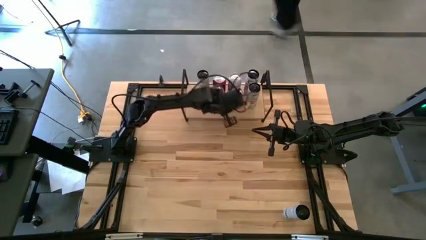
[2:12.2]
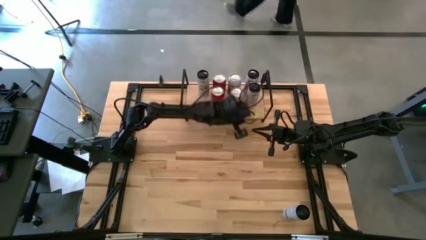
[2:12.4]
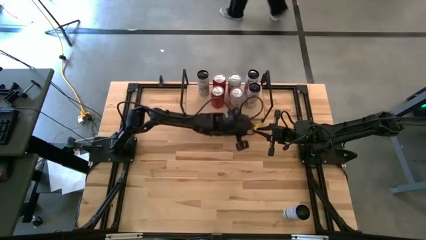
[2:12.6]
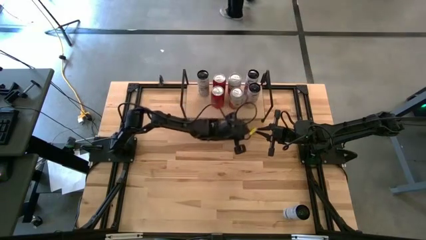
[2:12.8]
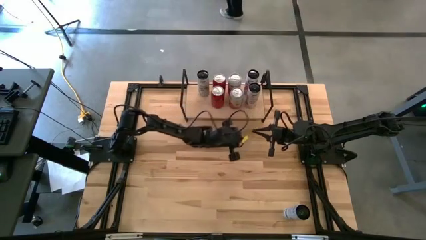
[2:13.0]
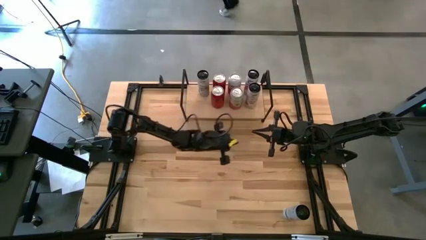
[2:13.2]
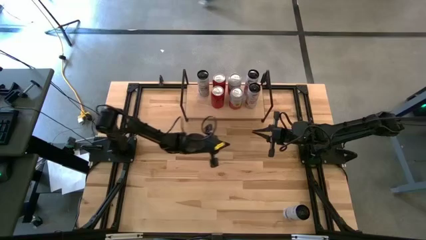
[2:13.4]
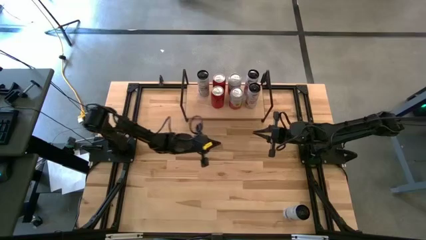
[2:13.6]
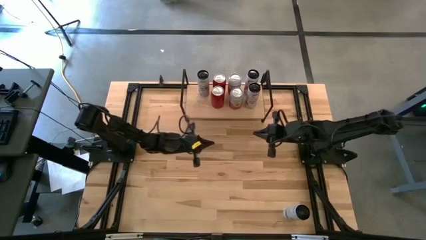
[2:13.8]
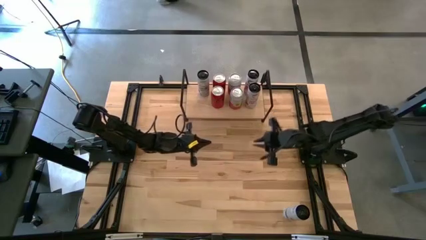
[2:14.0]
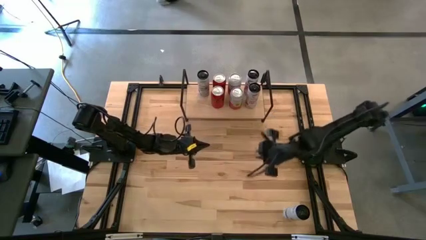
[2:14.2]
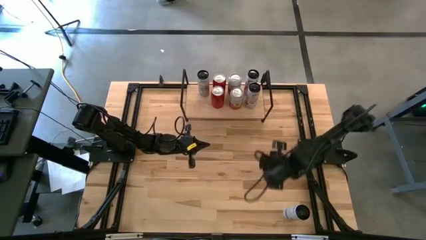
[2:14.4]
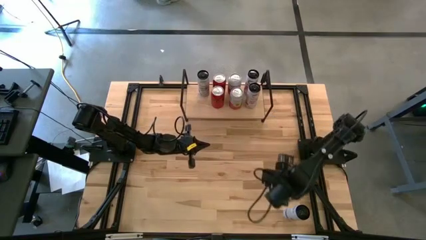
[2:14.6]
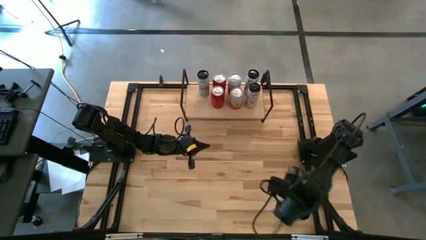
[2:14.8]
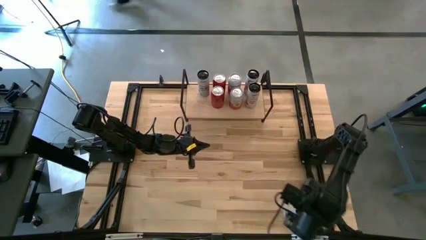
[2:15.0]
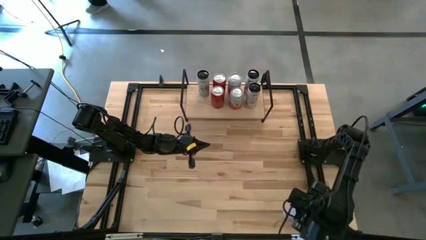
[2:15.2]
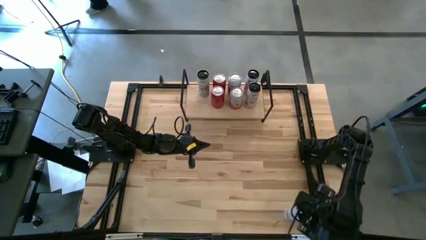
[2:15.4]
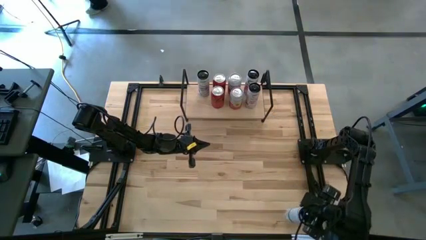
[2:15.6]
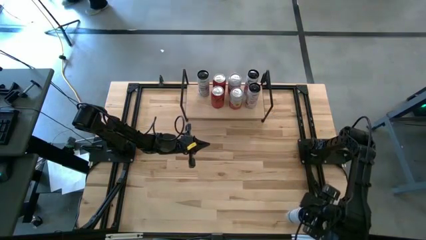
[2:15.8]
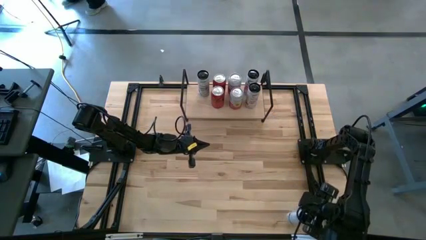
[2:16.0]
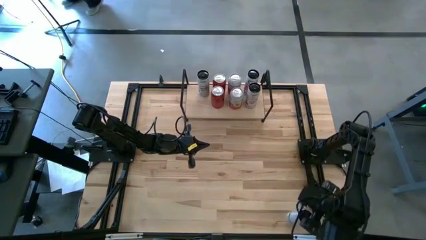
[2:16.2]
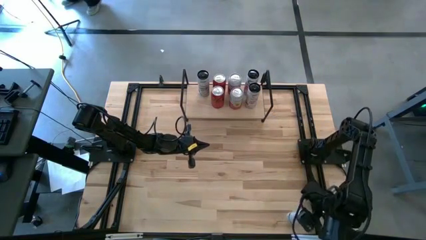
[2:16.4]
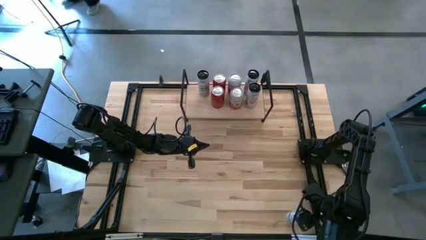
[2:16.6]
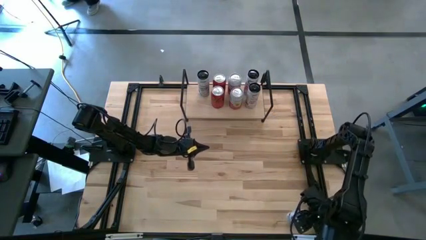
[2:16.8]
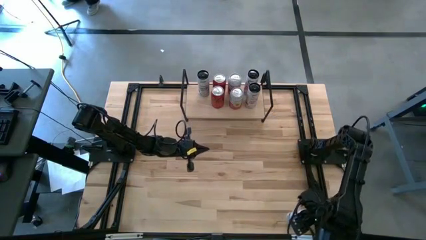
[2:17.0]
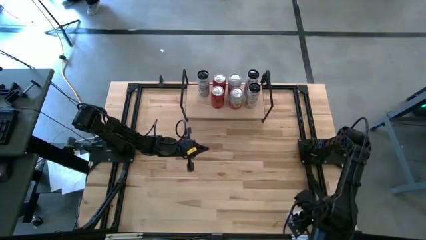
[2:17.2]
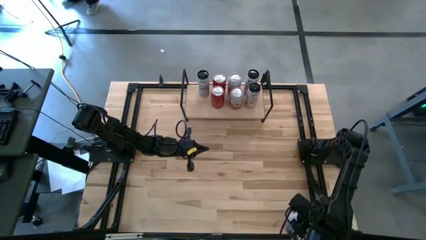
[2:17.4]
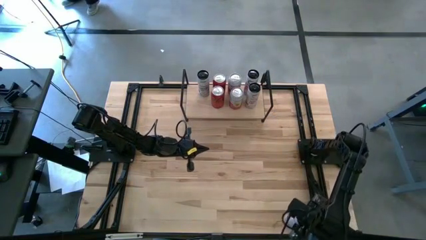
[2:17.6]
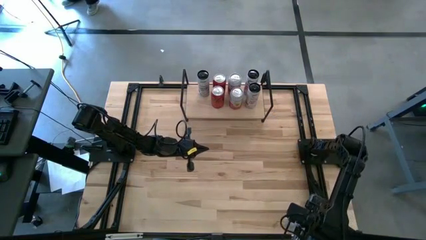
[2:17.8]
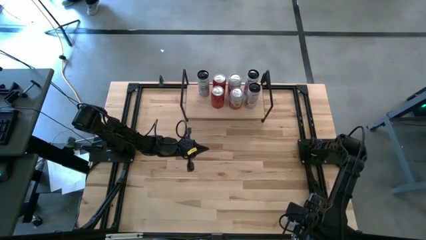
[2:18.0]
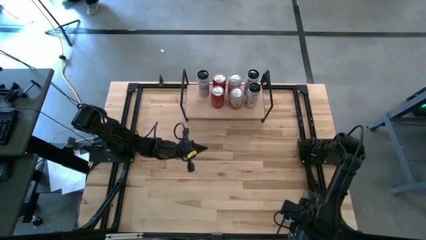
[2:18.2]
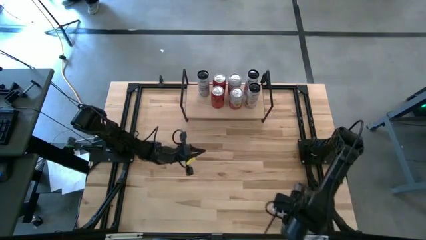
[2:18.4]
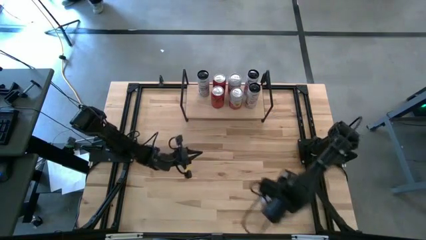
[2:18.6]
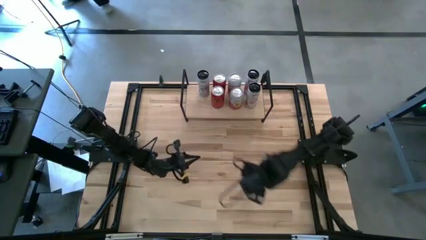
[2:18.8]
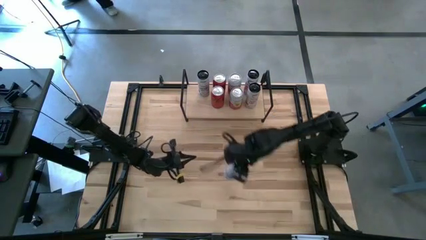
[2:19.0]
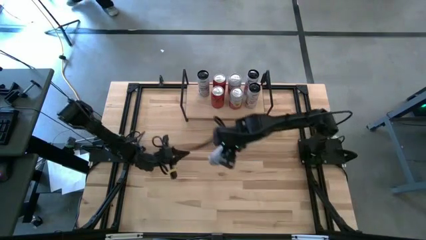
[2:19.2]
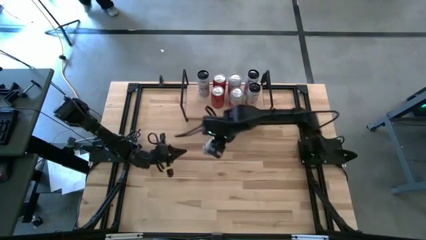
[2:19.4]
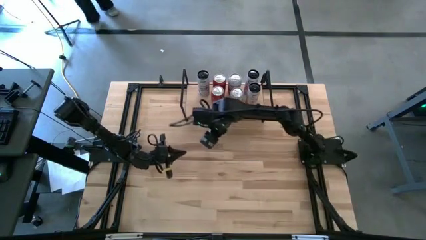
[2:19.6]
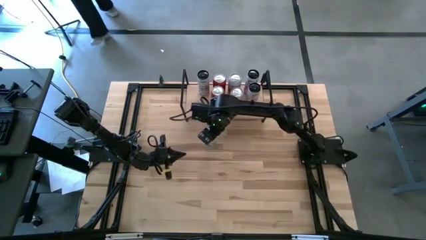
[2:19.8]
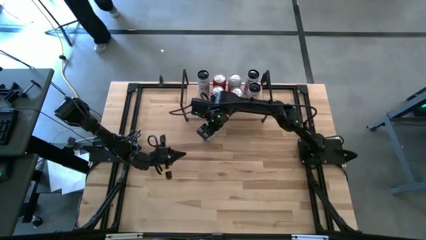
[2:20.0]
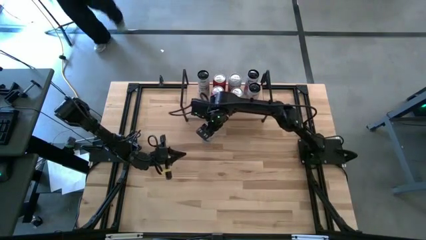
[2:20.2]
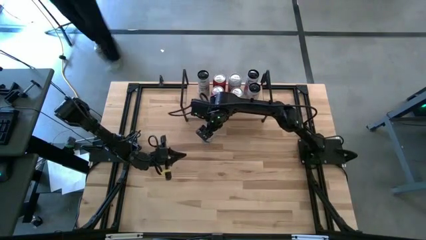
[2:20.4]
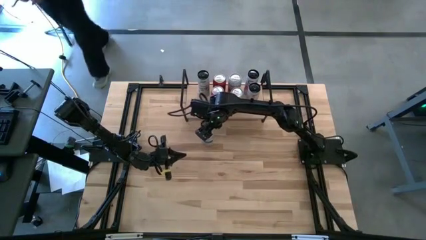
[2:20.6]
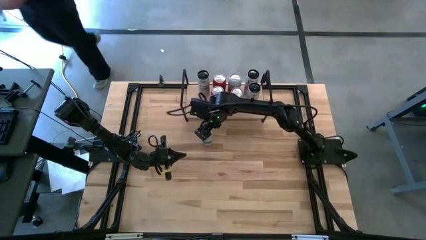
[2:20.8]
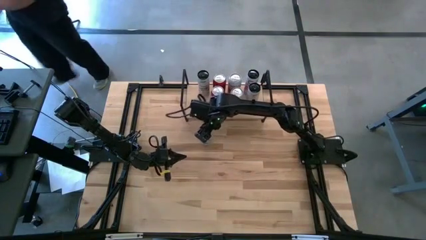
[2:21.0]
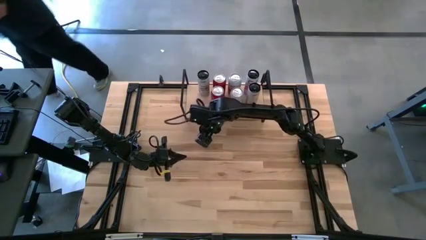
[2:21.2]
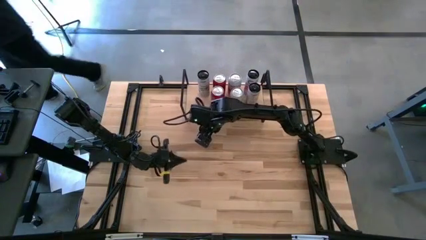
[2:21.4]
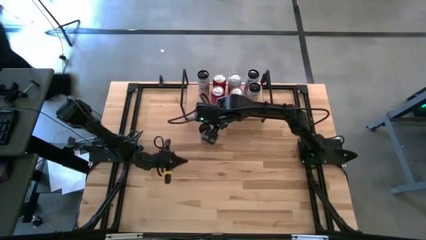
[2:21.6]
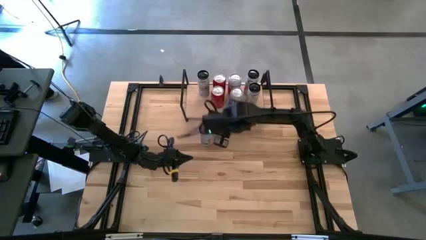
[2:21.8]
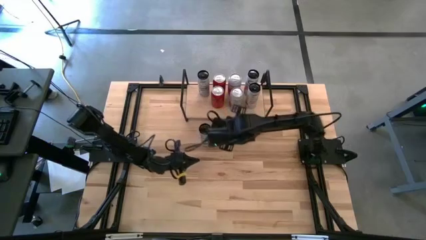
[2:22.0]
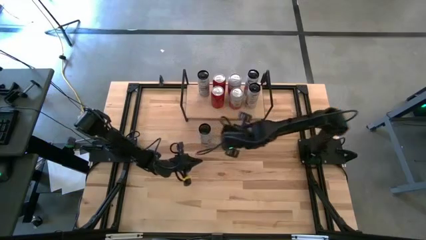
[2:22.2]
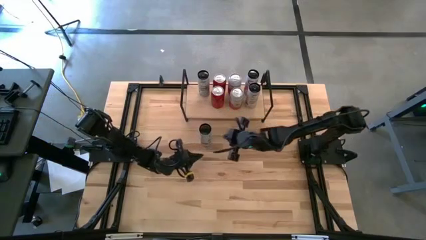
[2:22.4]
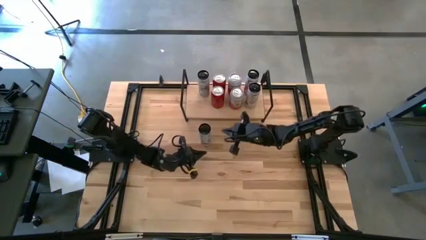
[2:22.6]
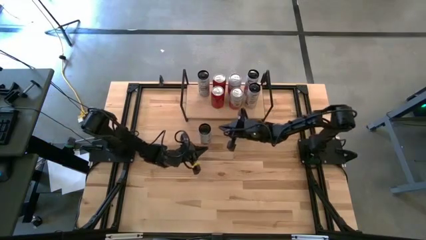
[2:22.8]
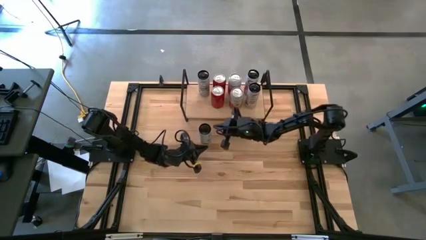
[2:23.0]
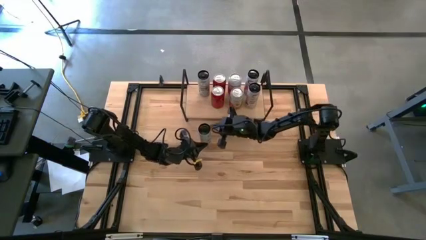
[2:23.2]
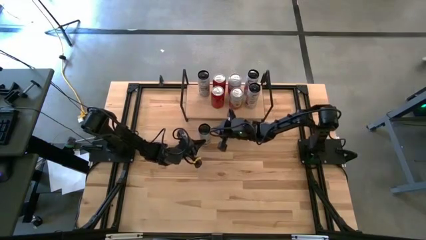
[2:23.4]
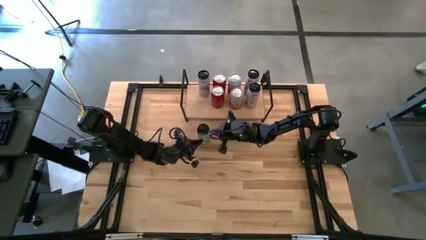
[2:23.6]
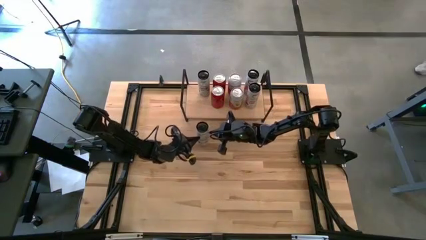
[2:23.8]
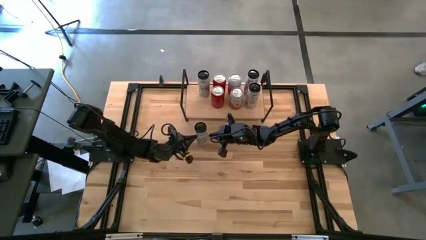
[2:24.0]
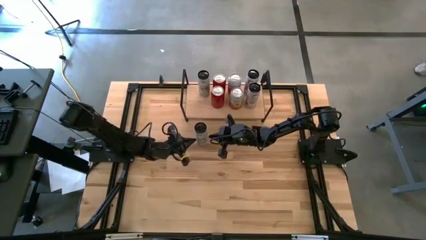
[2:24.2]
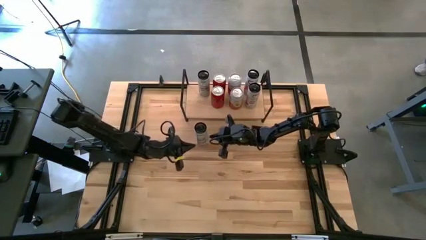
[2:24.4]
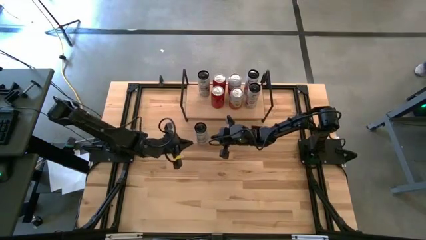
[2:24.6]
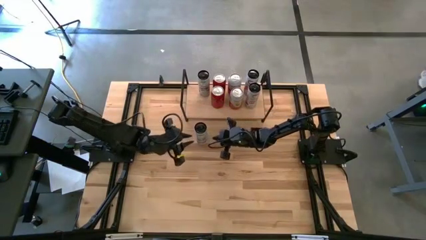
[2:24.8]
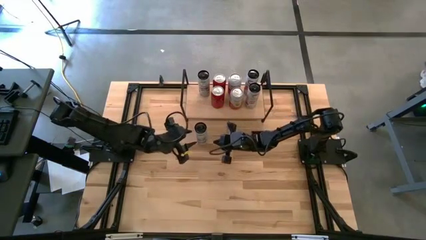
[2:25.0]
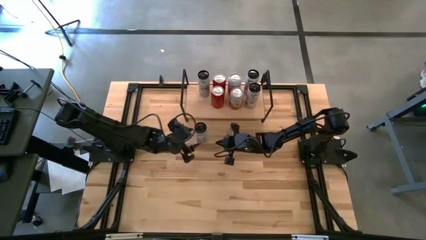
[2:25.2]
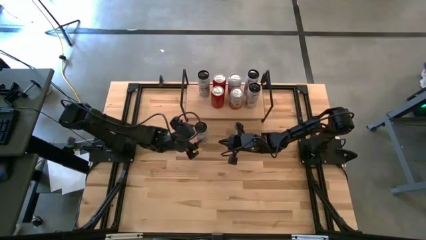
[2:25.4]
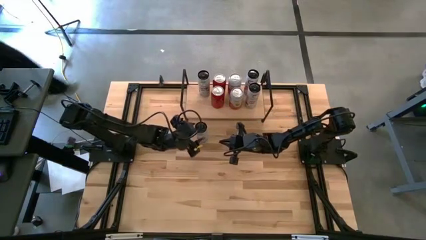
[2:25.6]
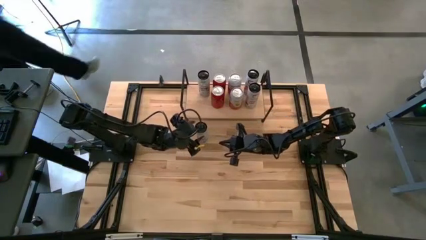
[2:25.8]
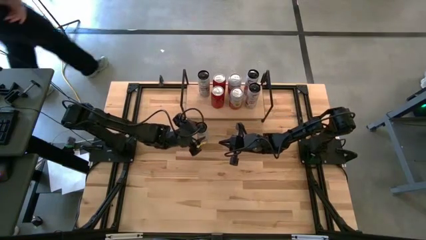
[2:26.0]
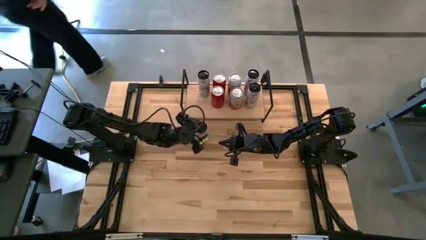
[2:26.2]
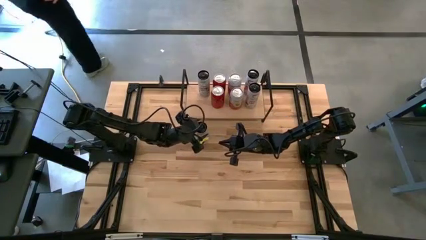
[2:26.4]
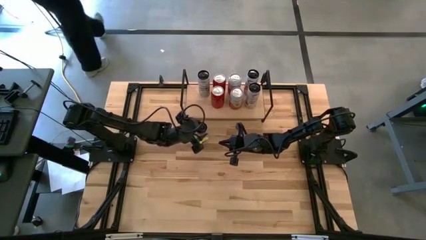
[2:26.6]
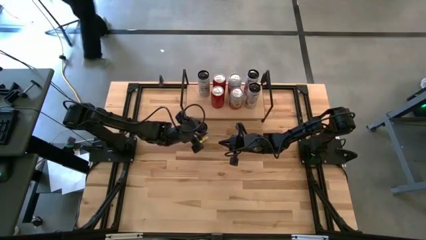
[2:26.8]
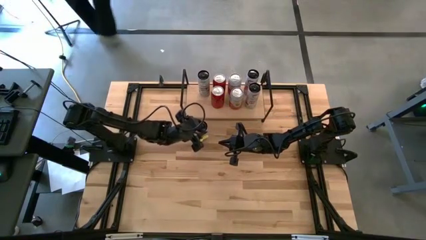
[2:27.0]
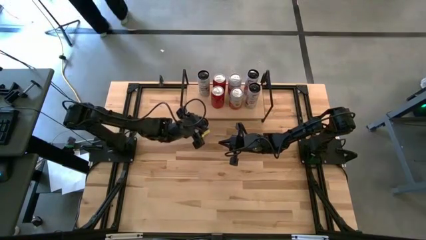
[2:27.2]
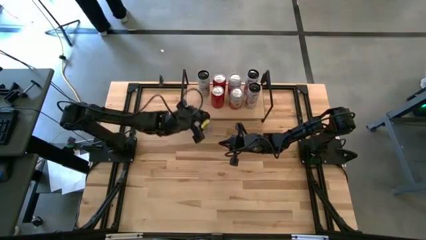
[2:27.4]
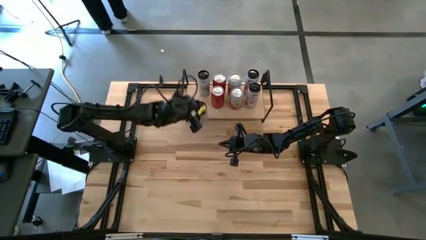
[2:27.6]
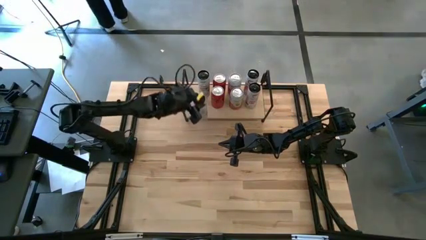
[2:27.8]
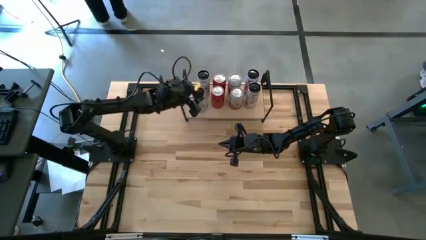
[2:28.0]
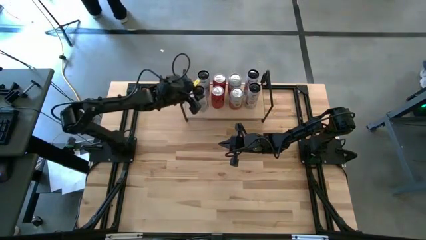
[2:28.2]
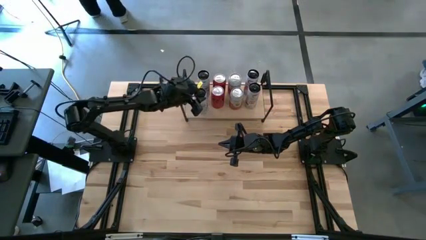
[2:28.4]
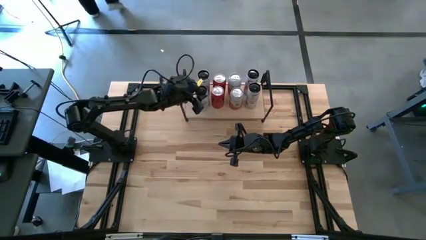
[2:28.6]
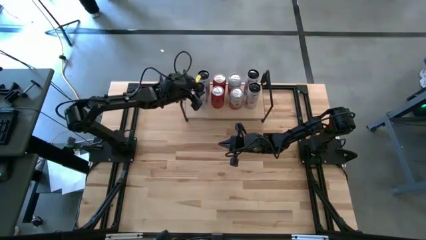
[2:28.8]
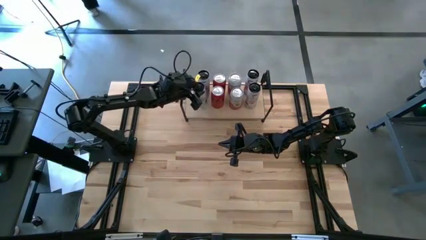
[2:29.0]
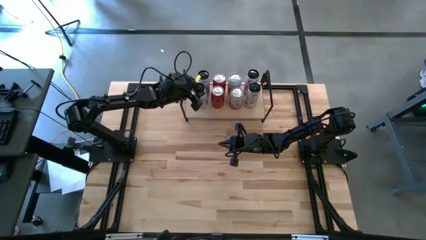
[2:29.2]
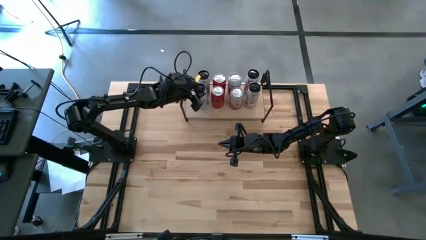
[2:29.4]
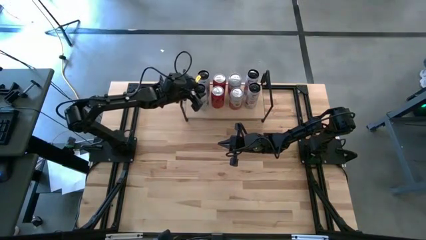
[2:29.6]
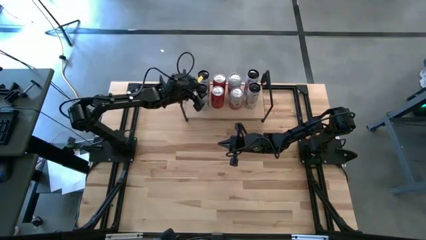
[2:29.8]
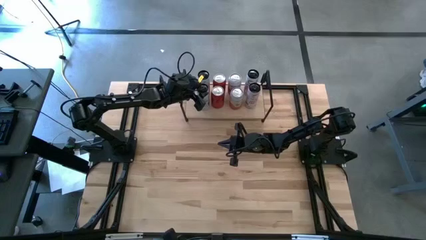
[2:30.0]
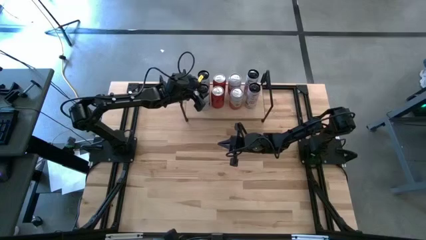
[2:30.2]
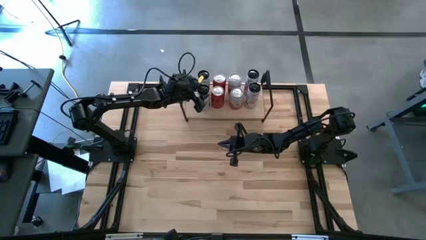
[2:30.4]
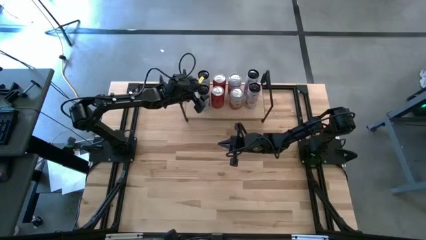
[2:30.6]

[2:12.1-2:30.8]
Task: Place canned beverage on shelf
Put the white and blue soda can on the shelf aligned with the other white and blue soda can
